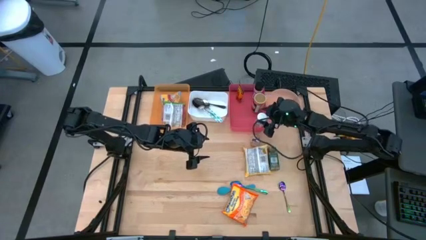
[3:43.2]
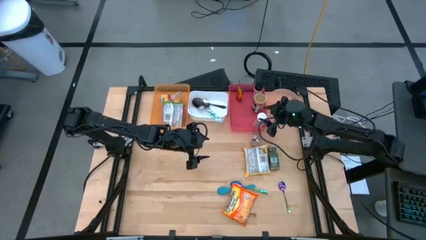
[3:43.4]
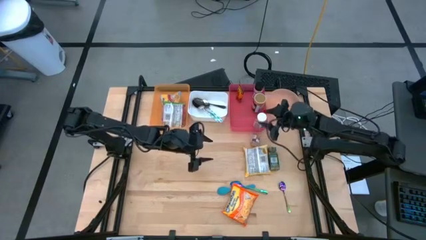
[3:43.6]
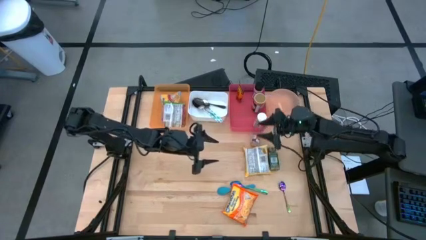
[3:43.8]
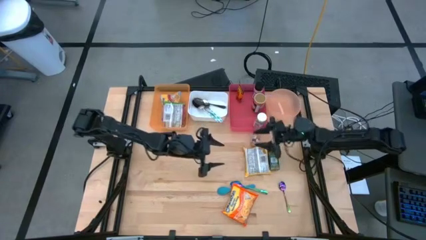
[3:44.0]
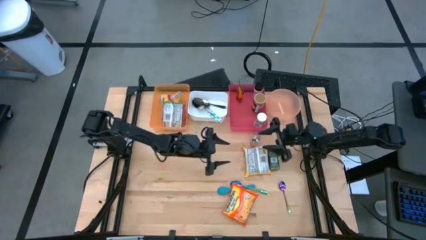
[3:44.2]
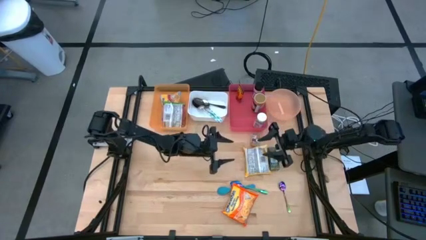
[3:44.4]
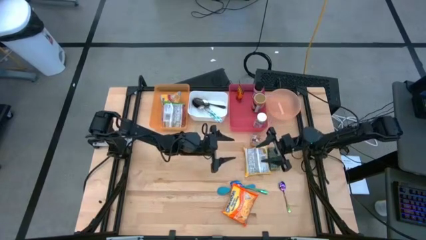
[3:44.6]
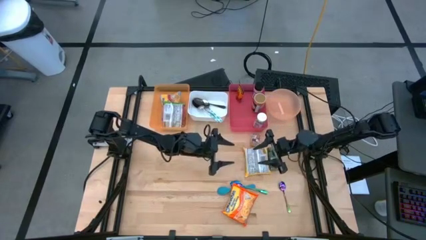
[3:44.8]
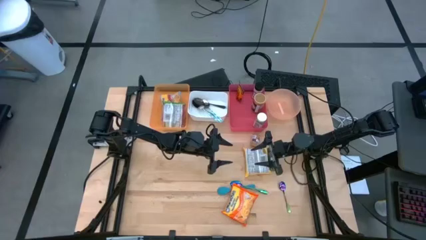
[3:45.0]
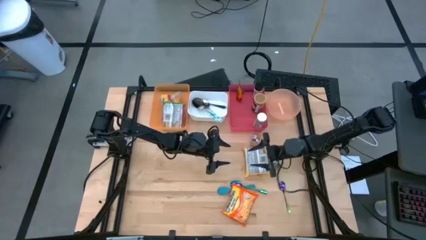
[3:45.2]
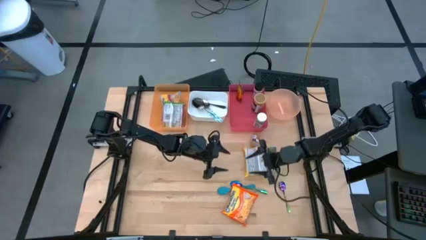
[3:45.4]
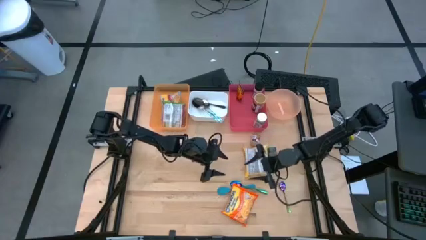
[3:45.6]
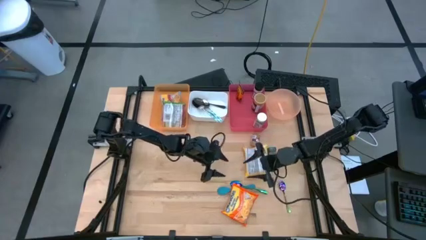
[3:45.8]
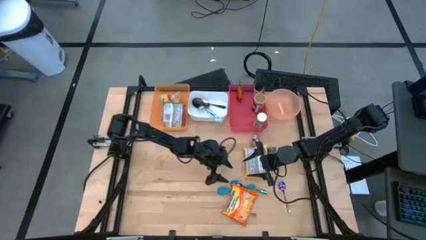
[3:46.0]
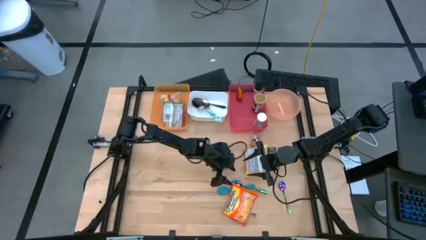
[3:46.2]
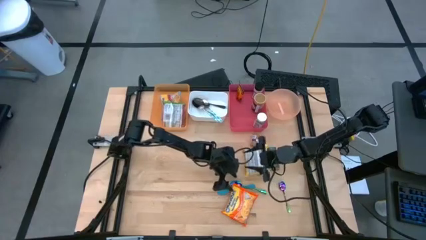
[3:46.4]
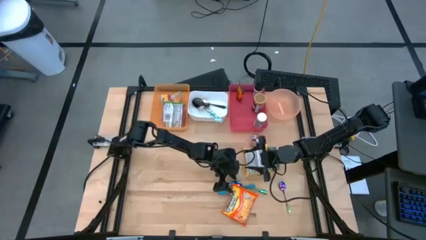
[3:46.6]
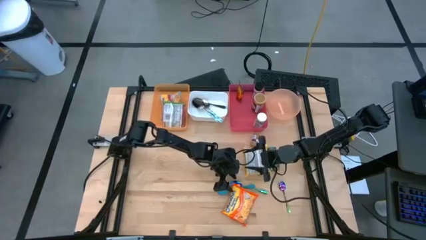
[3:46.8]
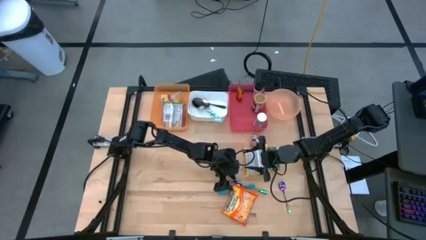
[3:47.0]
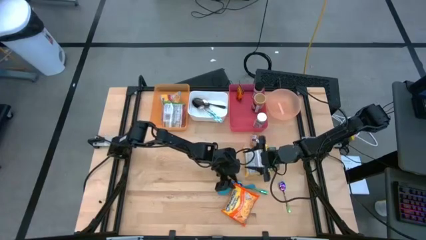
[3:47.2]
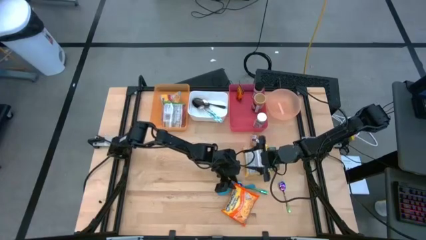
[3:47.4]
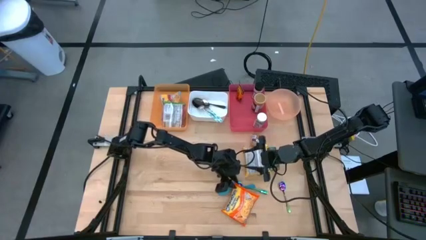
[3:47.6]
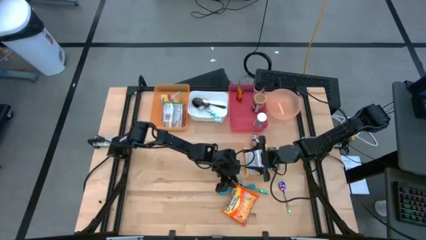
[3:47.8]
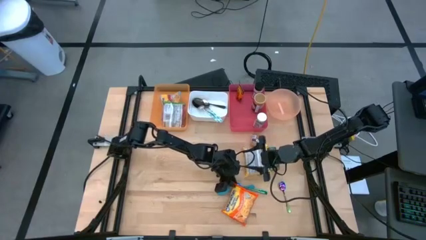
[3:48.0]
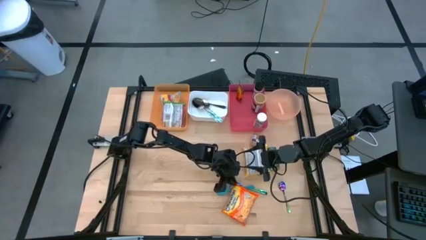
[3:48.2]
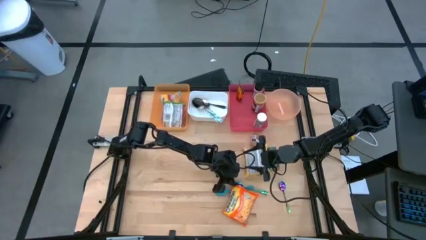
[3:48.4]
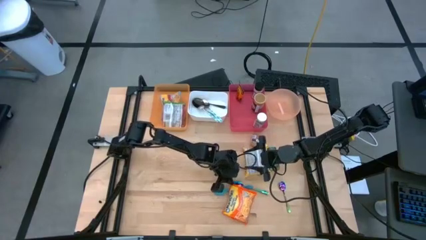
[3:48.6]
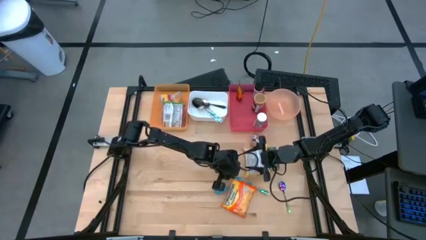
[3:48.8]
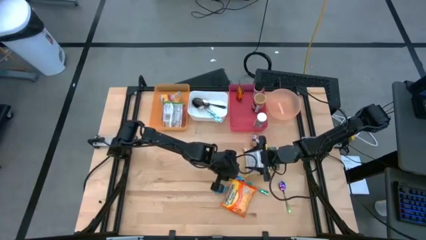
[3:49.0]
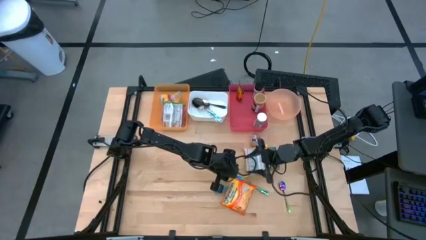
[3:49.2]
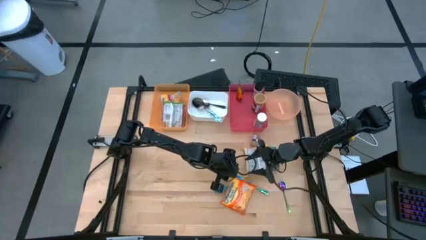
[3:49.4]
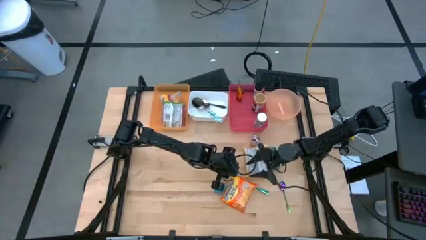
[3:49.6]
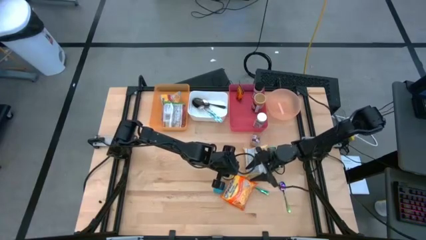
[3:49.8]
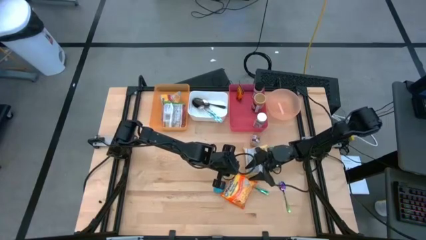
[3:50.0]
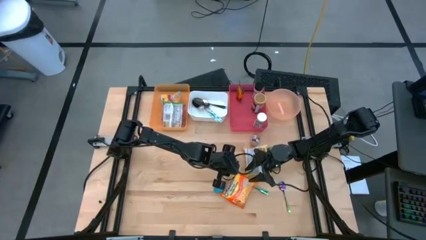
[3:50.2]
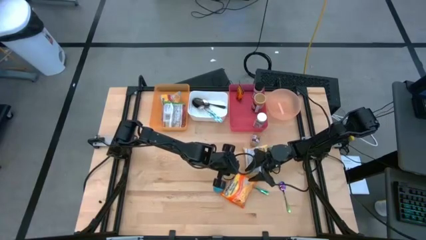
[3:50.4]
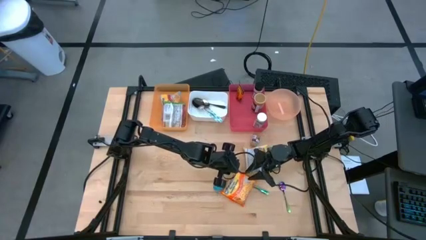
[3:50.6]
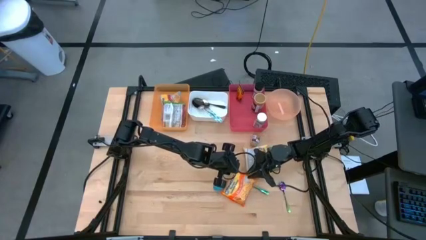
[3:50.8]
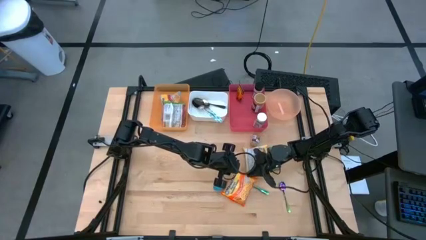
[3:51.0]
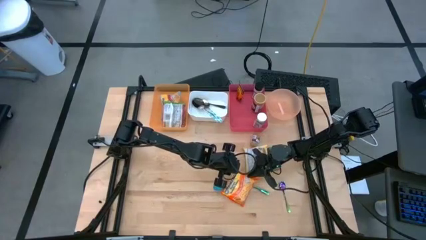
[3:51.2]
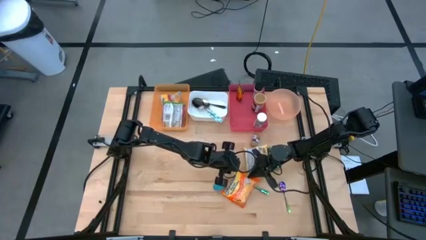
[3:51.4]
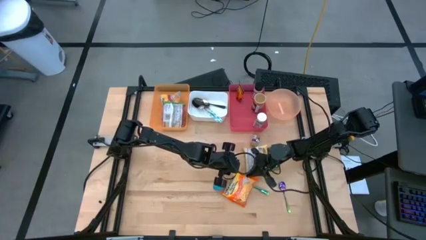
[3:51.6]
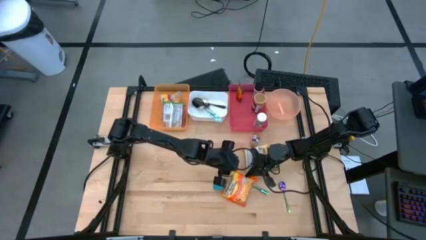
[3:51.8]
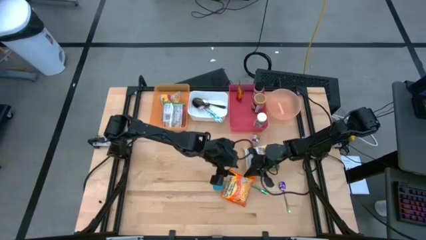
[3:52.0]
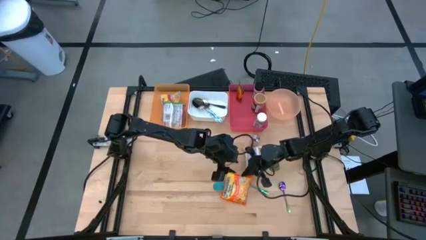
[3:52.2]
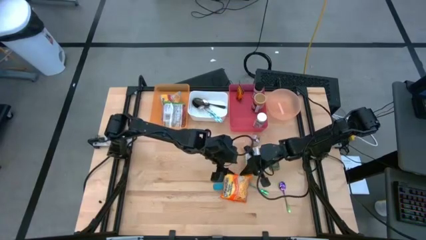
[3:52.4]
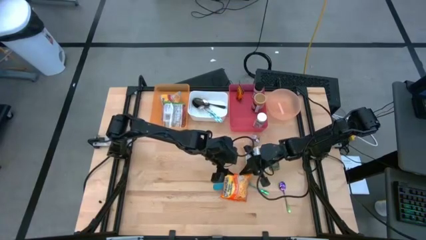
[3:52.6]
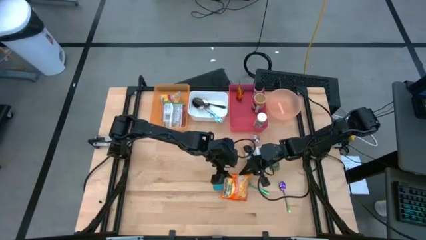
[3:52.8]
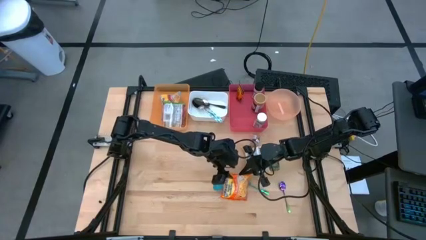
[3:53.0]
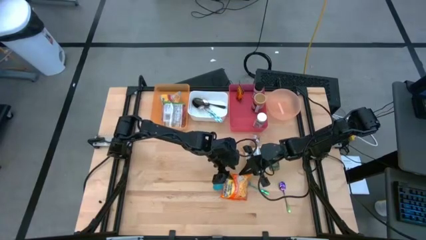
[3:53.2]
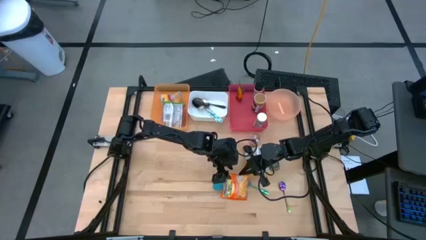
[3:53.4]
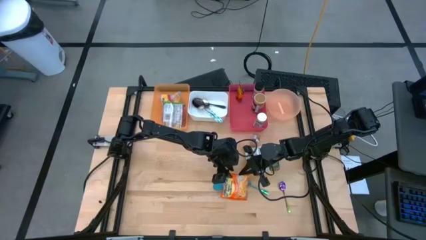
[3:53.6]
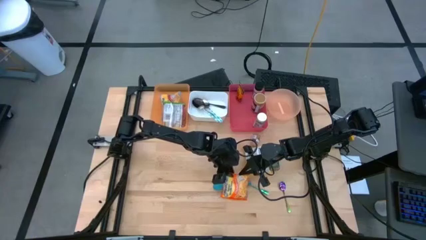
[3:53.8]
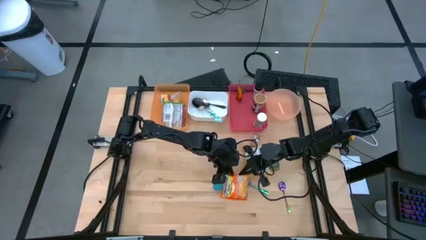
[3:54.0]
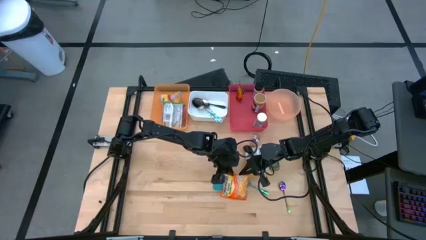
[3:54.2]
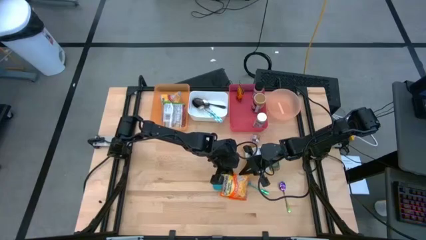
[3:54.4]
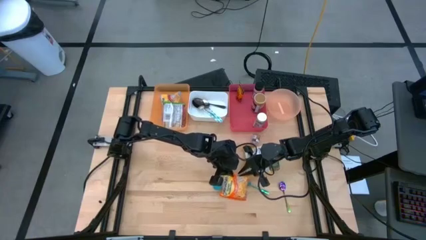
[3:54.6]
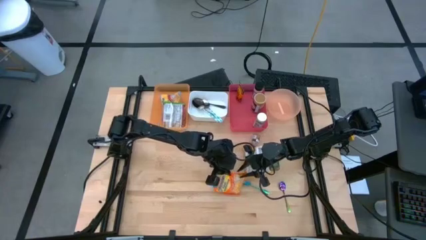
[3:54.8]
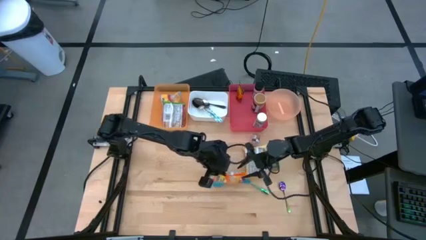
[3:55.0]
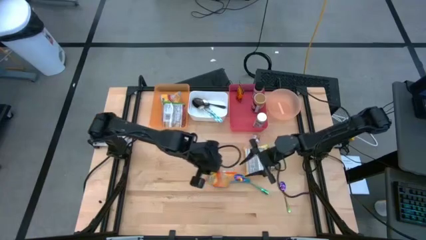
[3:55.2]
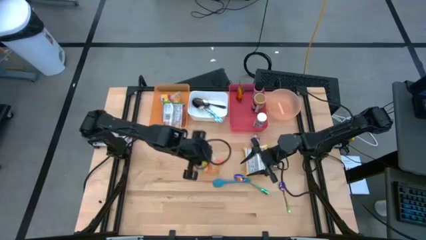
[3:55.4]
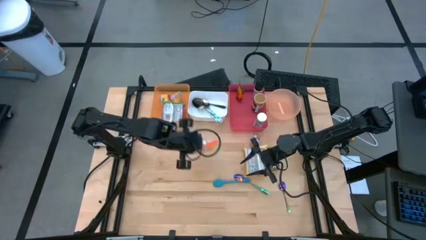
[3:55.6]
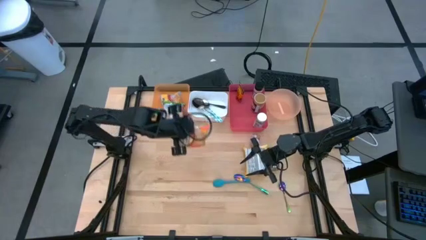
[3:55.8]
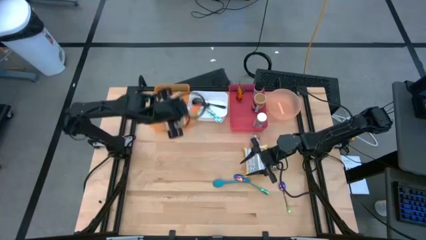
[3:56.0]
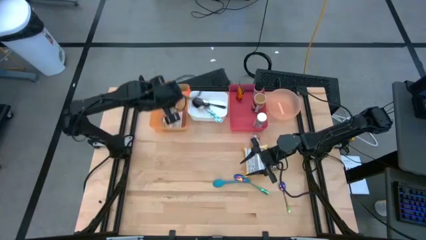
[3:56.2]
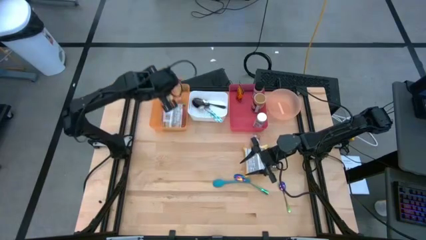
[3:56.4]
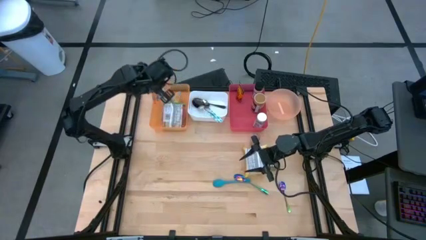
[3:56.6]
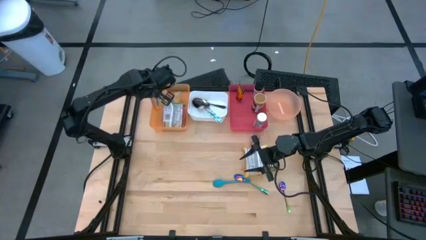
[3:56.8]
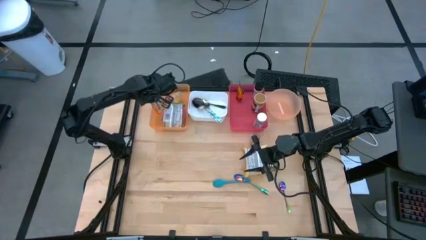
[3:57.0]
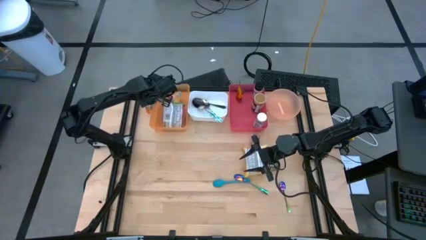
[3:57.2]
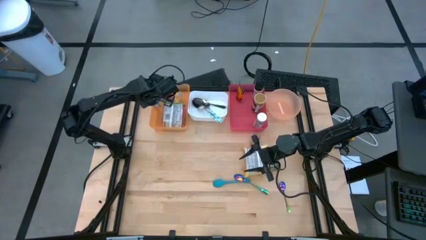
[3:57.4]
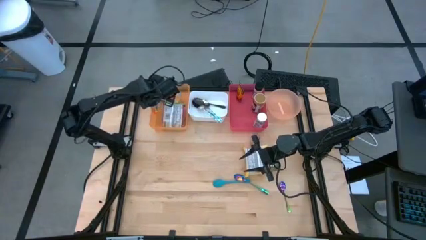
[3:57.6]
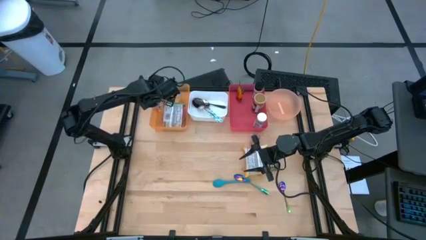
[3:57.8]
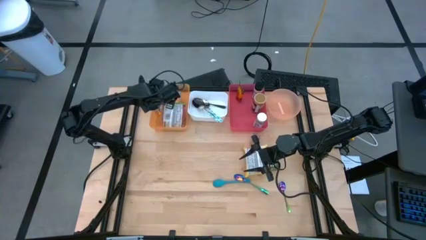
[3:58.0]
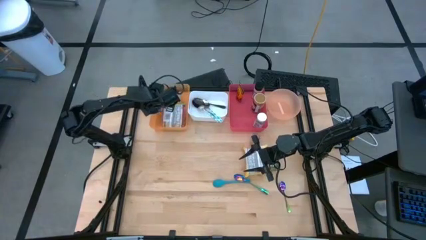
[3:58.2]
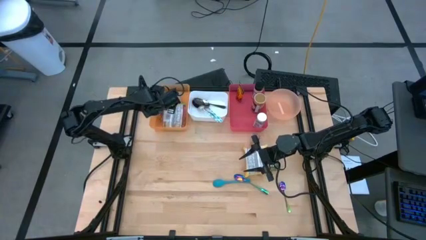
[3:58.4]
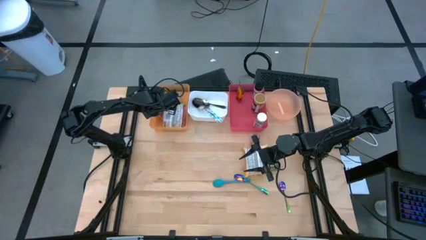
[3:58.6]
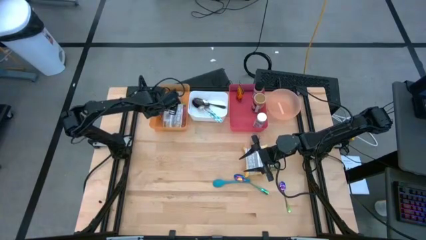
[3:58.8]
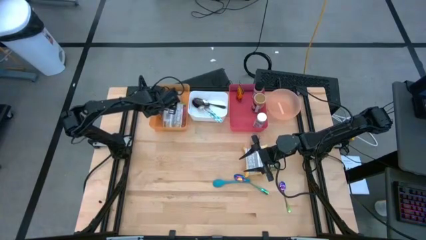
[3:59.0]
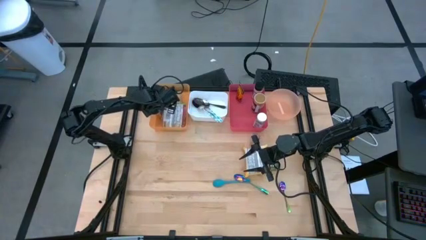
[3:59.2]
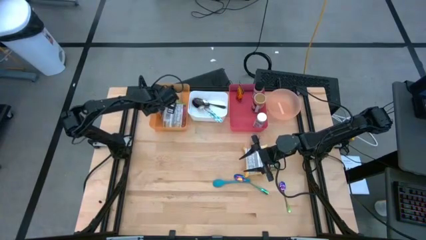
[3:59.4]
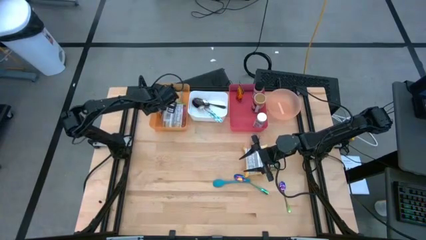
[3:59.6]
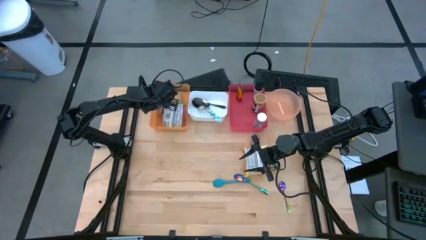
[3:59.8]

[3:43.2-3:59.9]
Task: Pick & Place Food Item
Put the orange noodle pack into the orange bin
